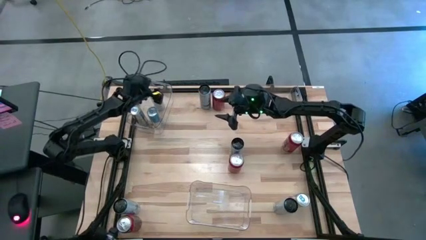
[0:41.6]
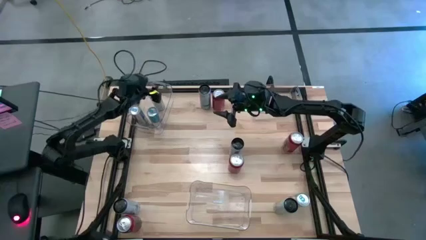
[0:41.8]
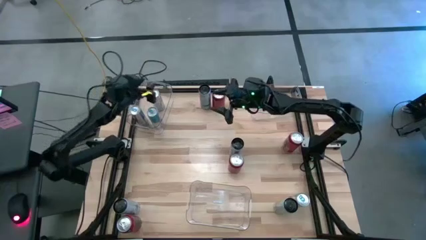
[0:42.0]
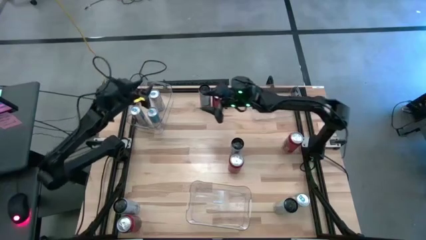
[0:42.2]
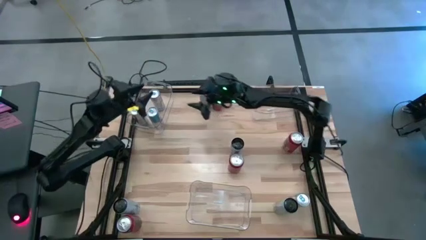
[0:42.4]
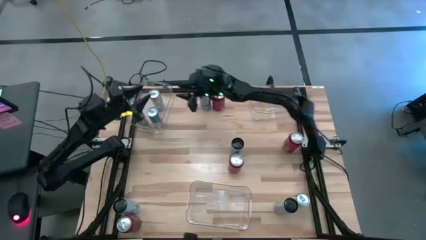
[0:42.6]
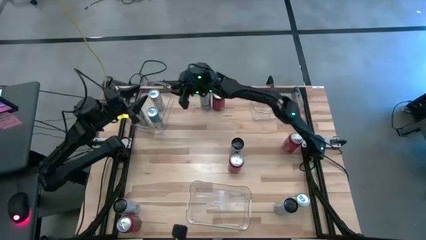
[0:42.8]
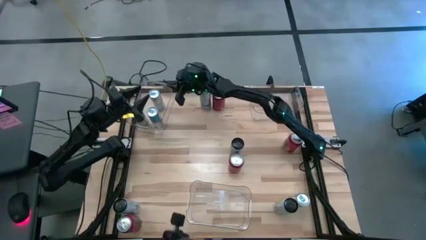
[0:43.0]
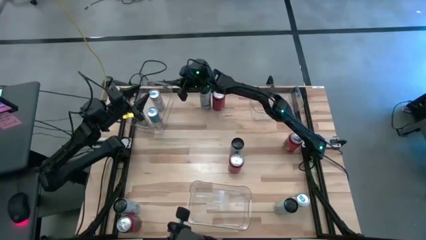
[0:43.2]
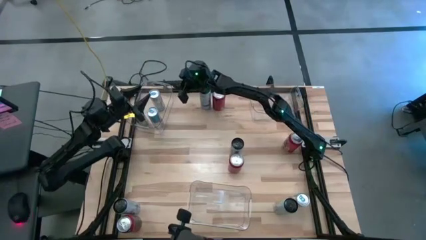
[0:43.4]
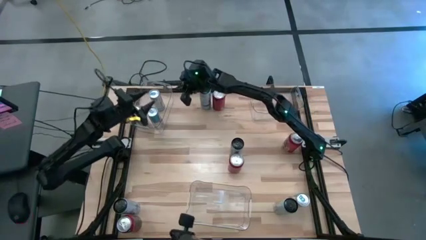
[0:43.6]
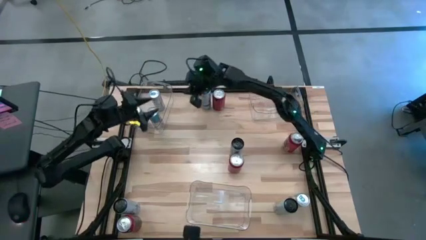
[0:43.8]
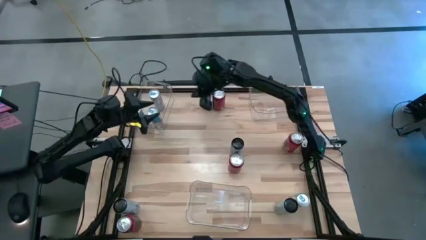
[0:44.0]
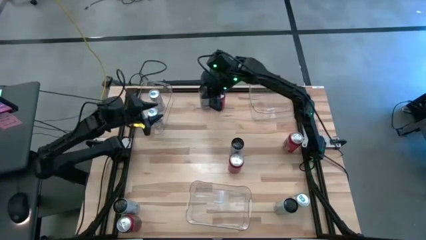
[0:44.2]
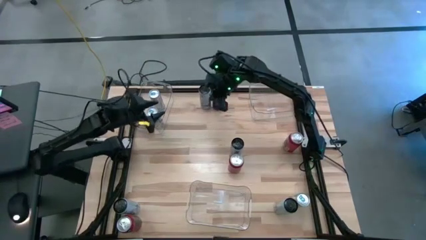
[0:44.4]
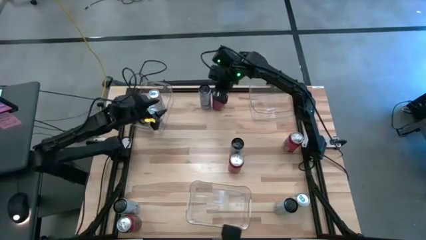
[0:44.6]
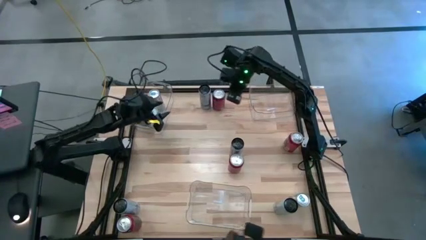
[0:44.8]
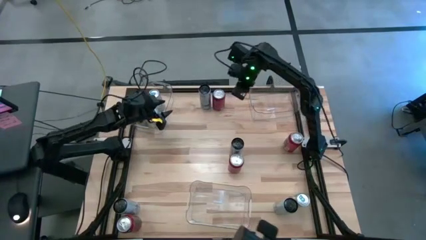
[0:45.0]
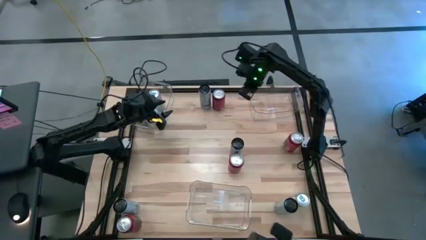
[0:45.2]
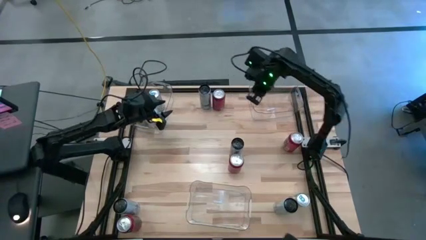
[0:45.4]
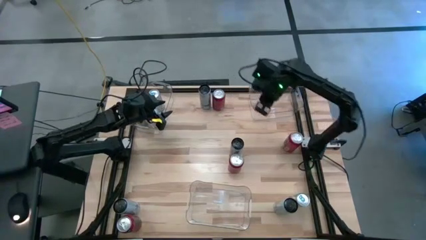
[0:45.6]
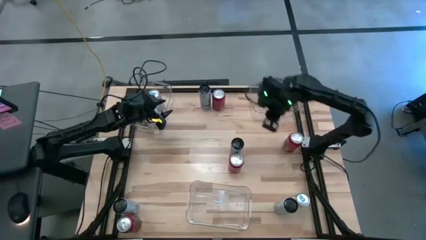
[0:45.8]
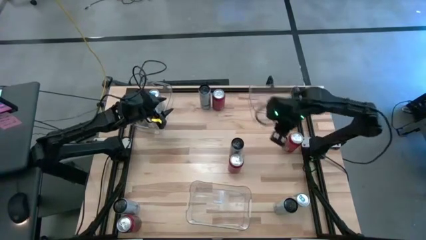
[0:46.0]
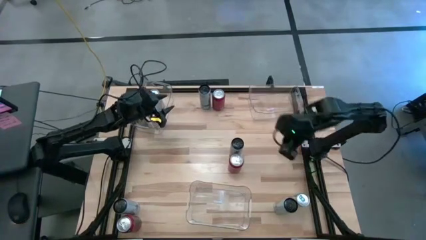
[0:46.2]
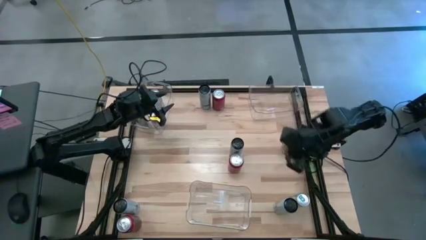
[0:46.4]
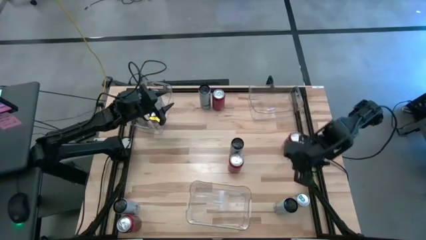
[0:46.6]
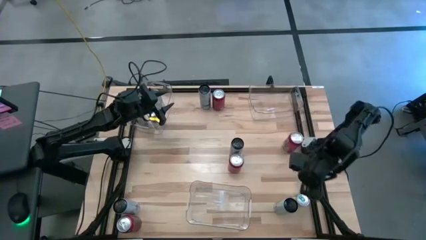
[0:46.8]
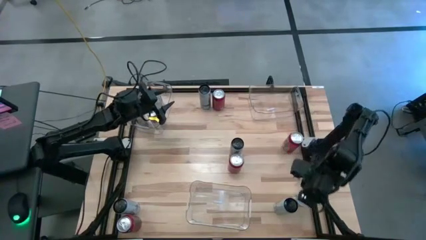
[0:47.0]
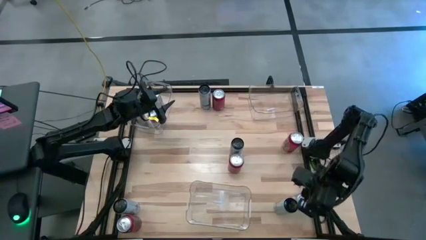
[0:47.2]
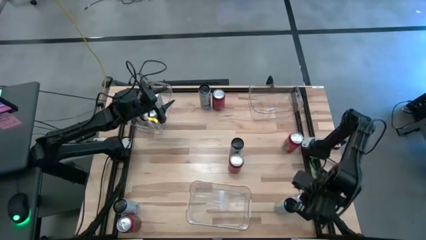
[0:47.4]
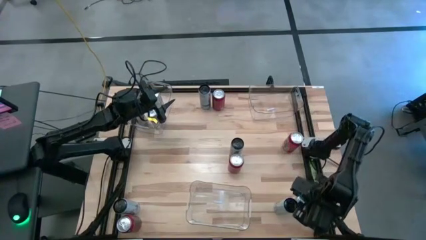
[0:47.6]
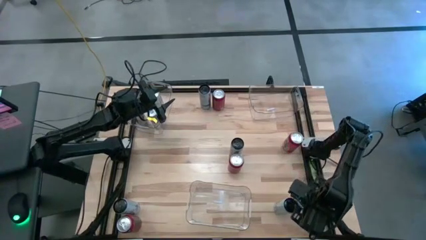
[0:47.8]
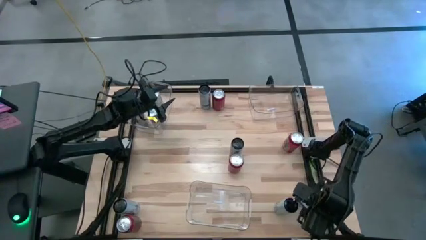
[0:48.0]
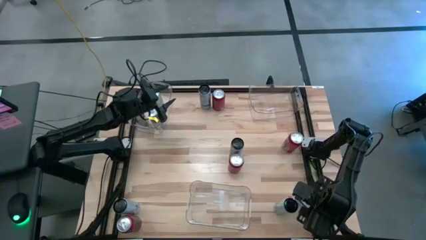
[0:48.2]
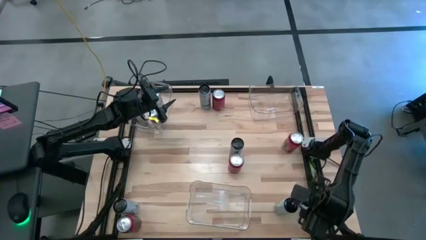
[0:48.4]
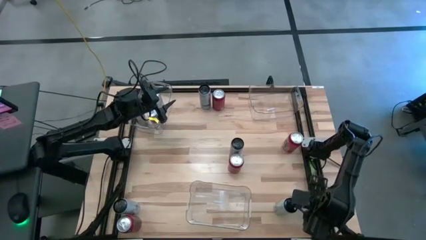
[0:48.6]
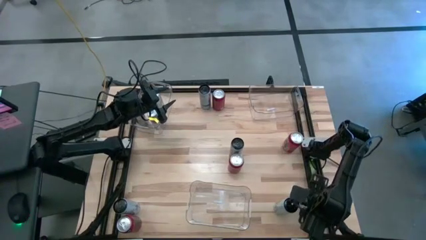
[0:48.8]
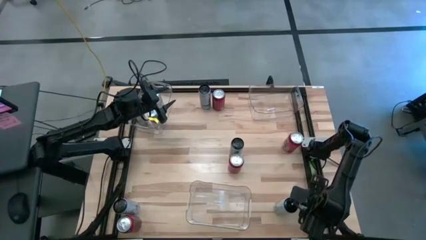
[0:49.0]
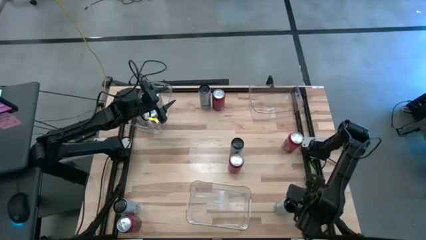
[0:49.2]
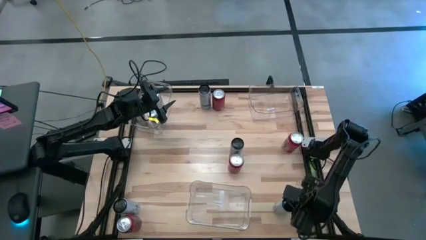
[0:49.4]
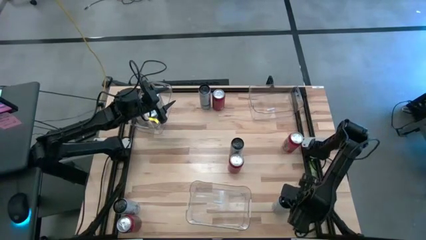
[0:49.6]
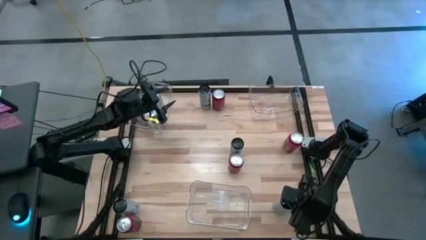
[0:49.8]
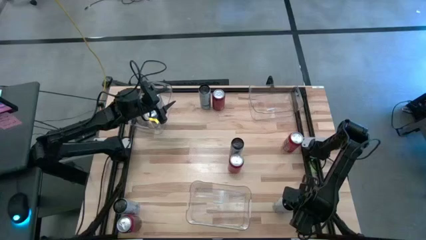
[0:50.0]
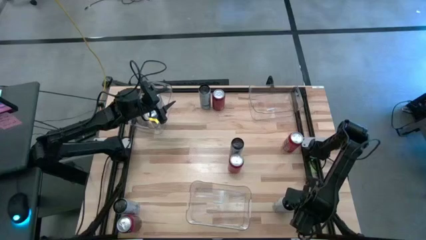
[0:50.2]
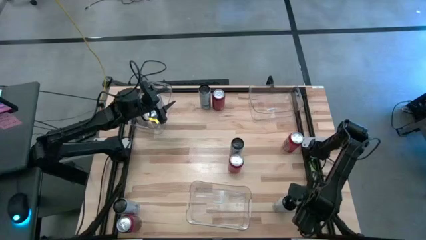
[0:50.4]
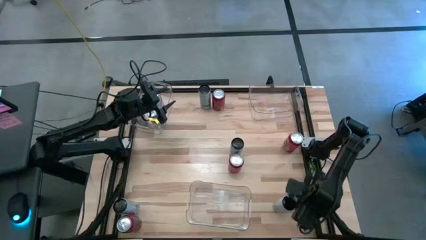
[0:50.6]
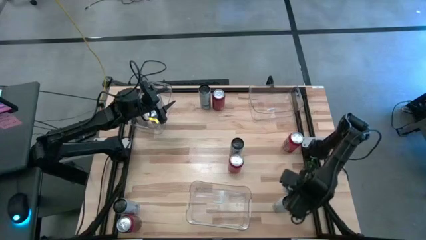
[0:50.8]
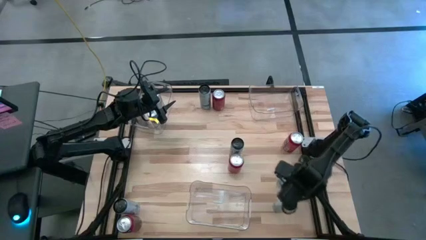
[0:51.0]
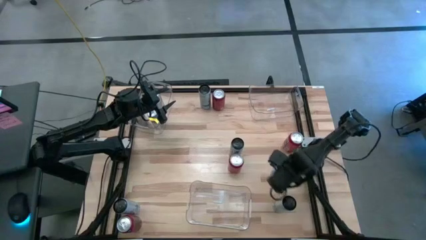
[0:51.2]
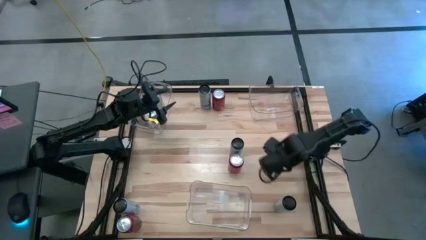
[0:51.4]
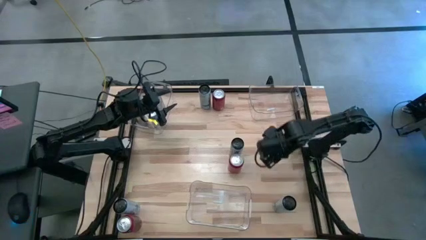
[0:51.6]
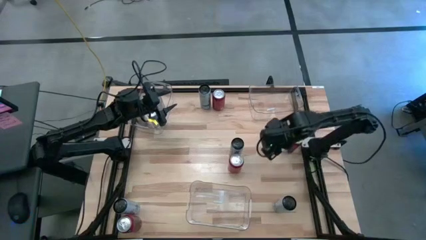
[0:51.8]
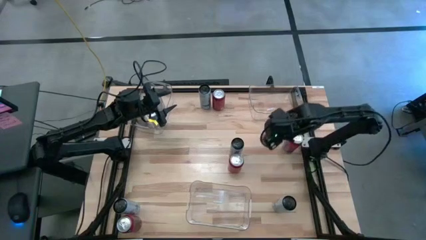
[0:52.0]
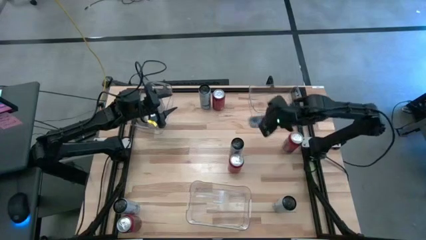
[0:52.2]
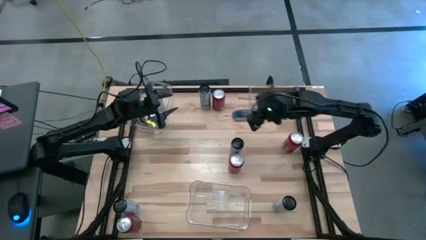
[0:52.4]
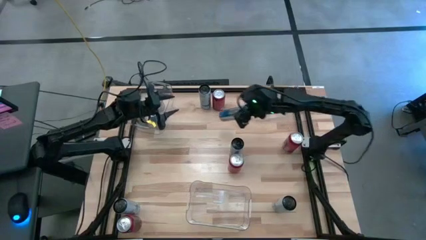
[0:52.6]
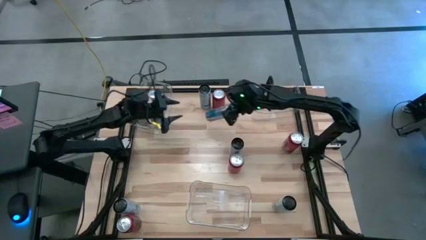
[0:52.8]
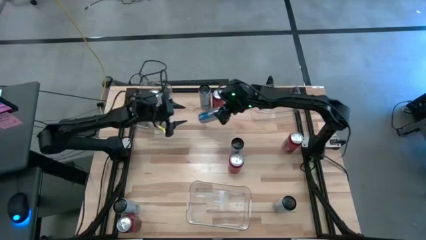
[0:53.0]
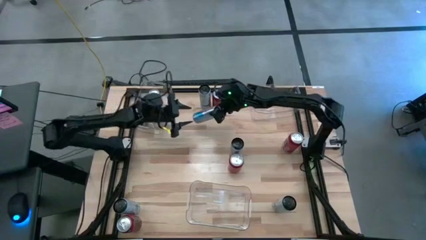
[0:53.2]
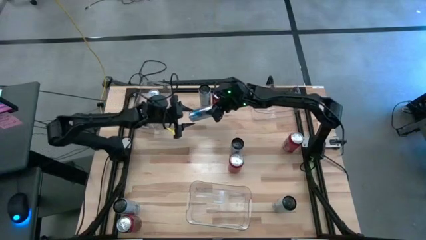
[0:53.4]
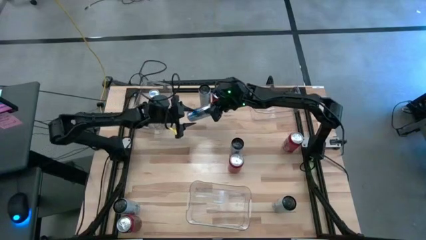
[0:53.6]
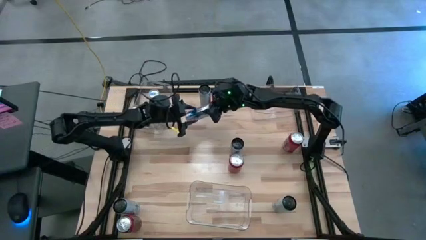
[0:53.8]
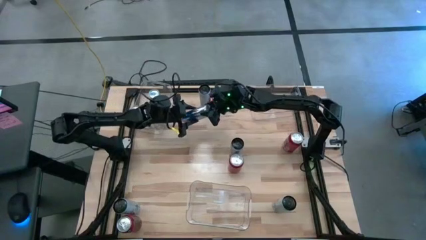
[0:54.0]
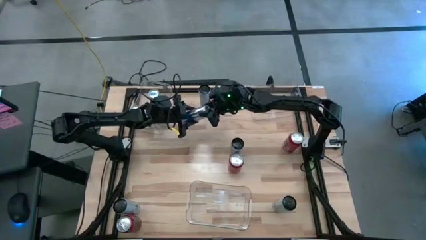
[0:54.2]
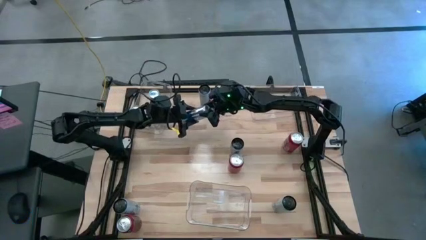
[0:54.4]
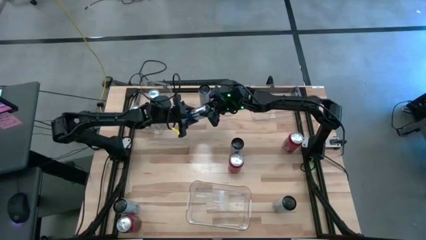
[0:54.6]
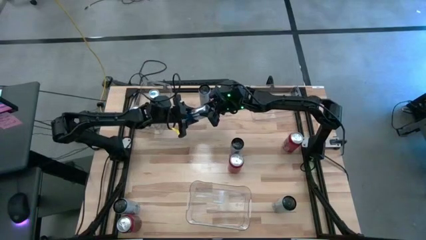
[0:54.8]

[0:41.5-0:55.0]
Task: Sort soda cans
Put the blue soda can into the top left transparent bin
